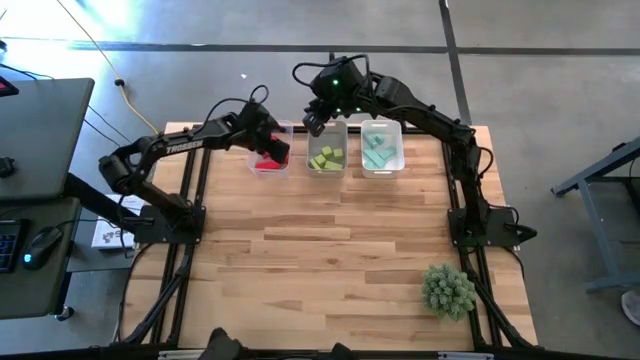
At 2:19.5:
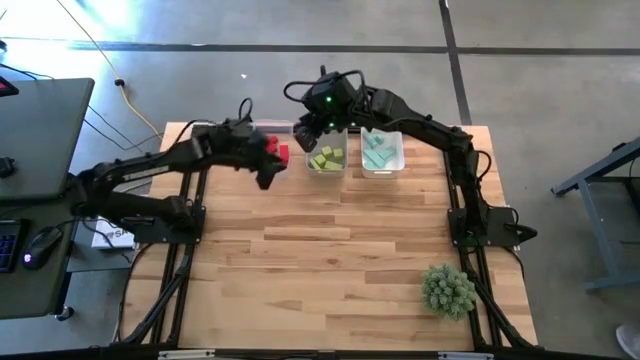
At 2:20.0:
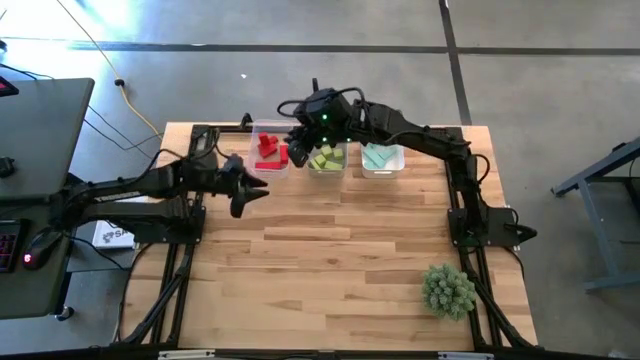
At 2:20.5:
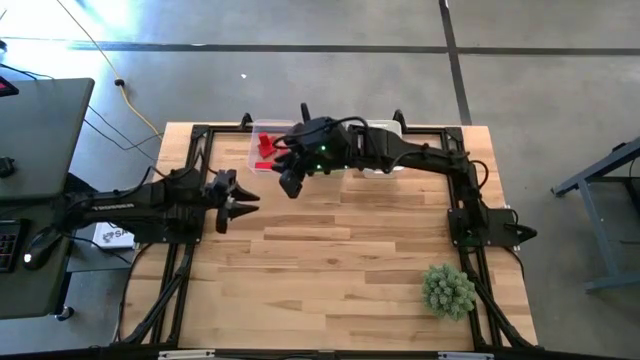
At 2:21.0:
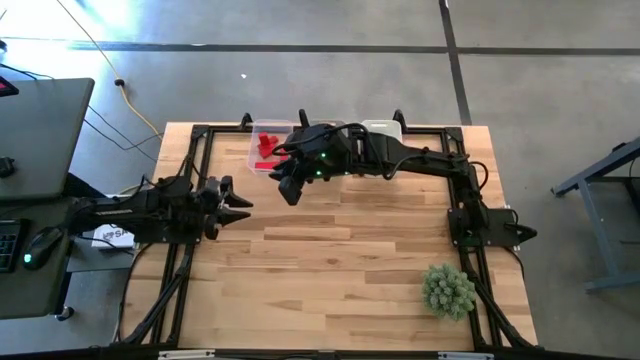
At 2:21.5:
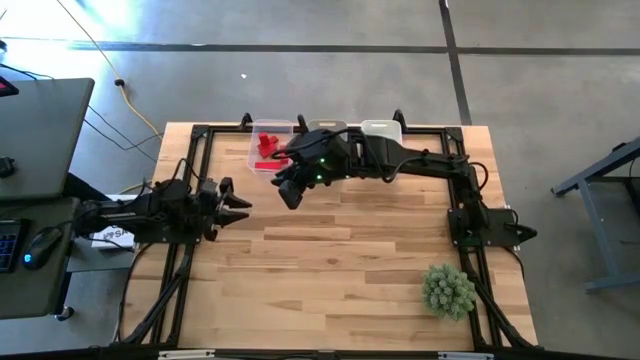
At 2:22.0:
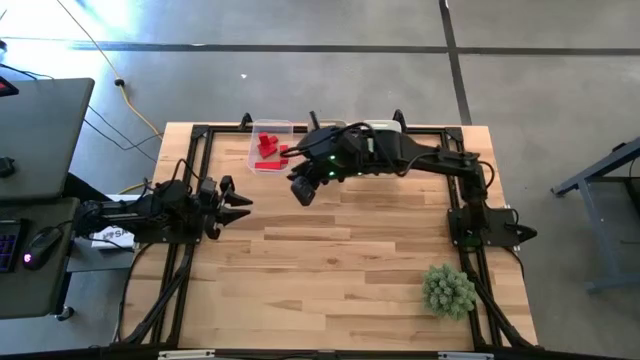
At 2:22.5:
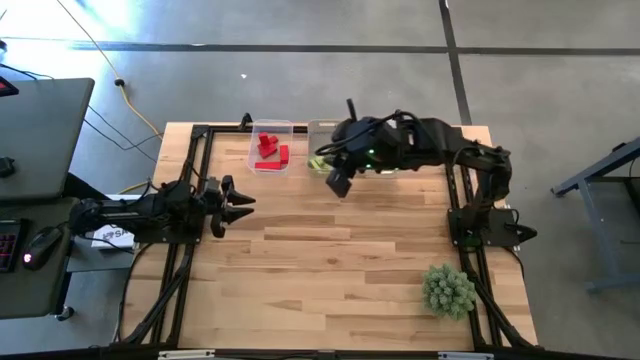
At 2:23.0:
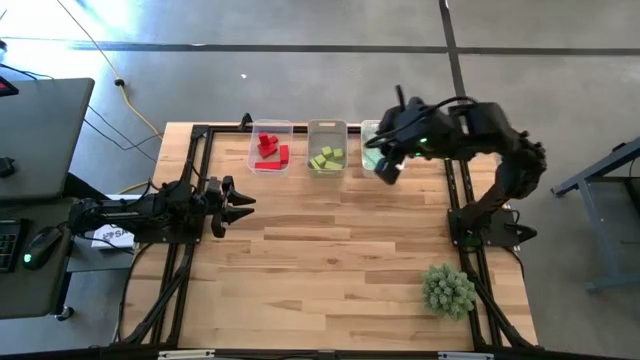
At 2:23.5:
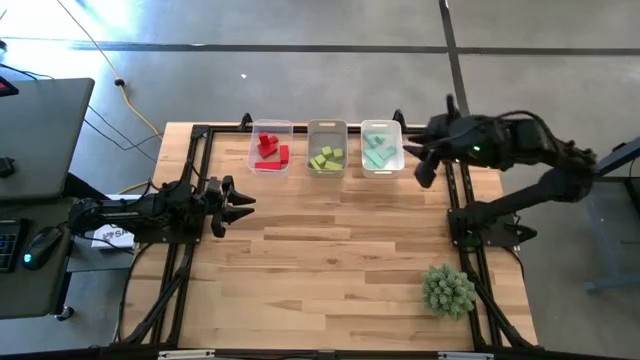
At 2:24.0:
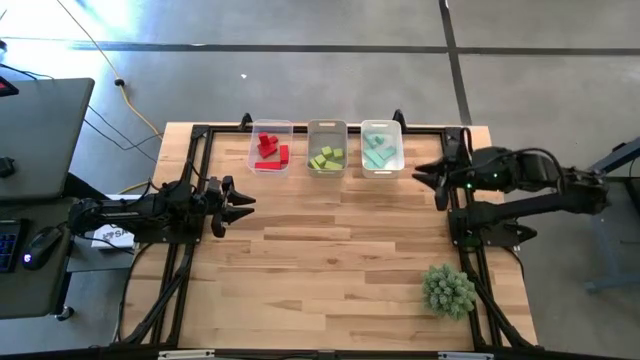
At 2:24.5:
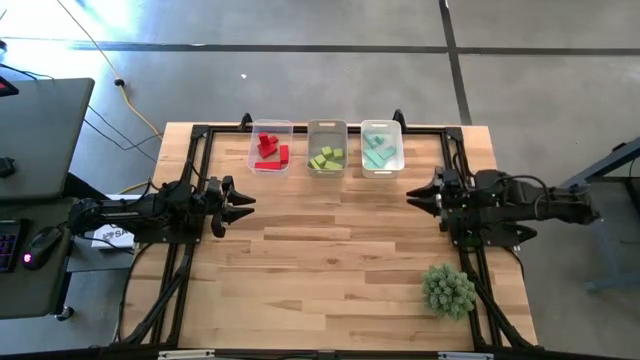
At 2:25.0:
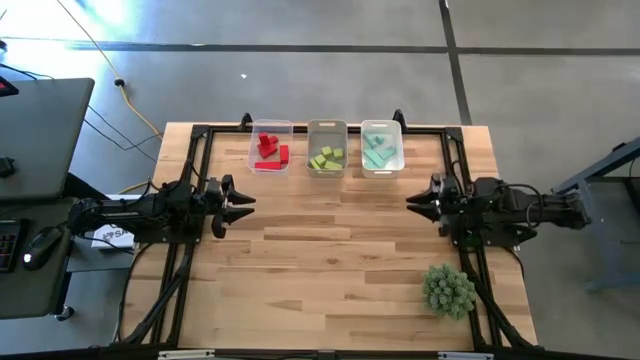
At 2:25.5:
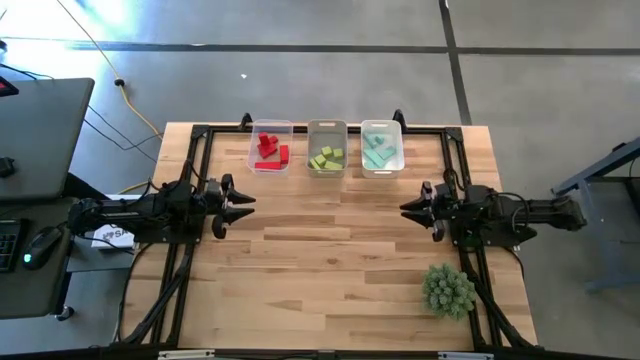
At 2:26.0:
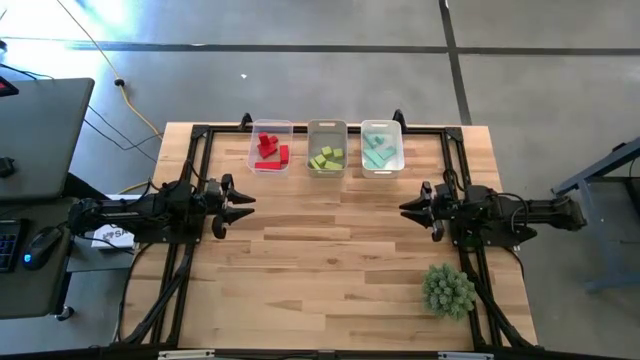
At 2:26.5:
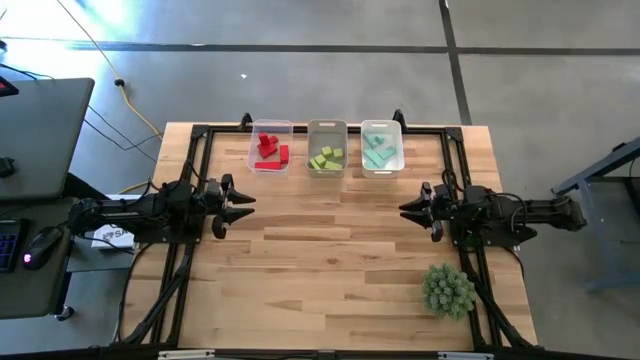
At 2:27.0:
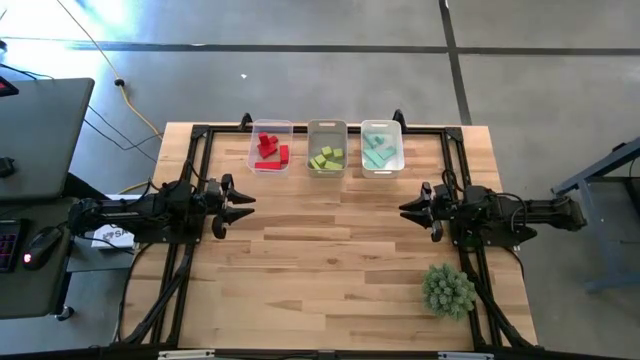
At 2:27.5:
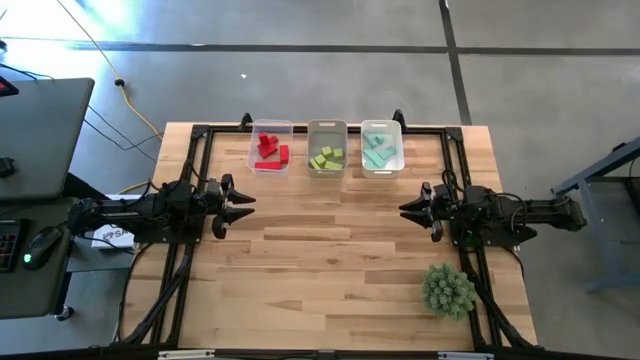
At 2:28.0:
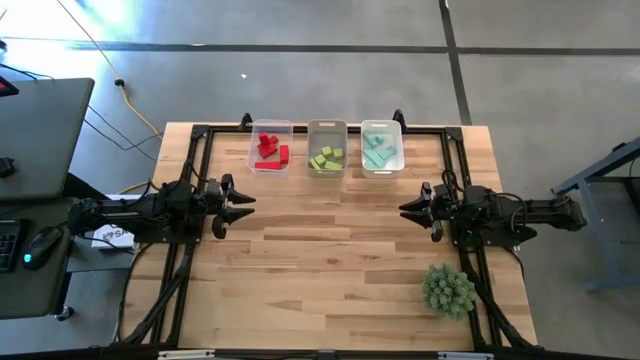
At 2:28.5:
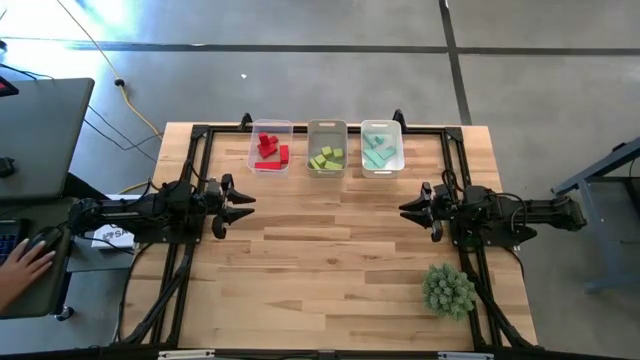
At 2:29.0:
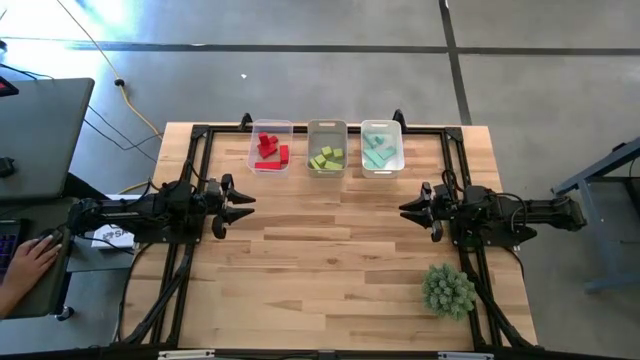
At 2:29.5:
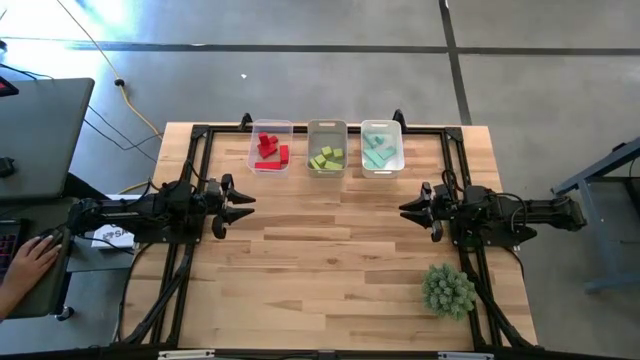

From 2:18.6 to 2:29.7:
Task: Sort & place blocks by color
Return to Home Position

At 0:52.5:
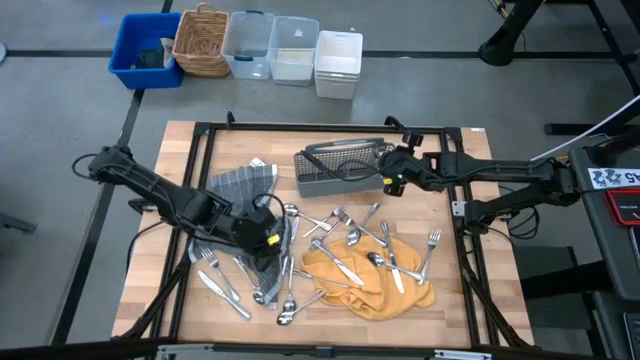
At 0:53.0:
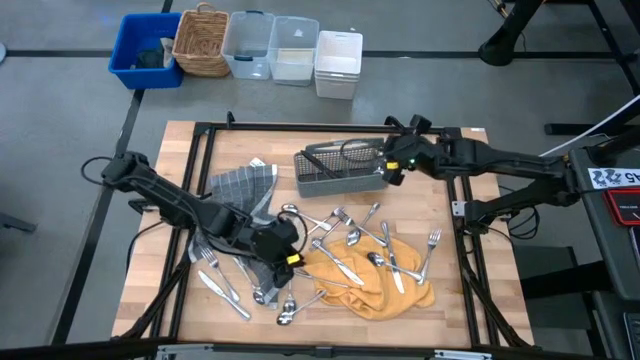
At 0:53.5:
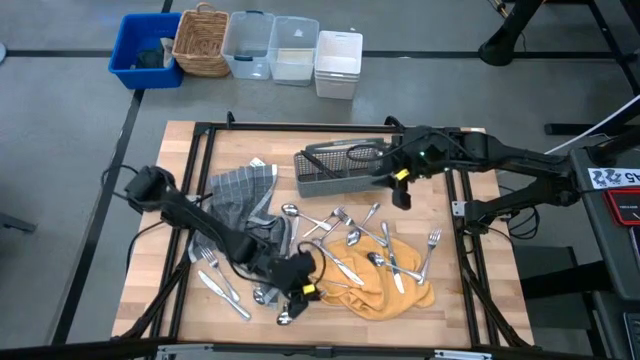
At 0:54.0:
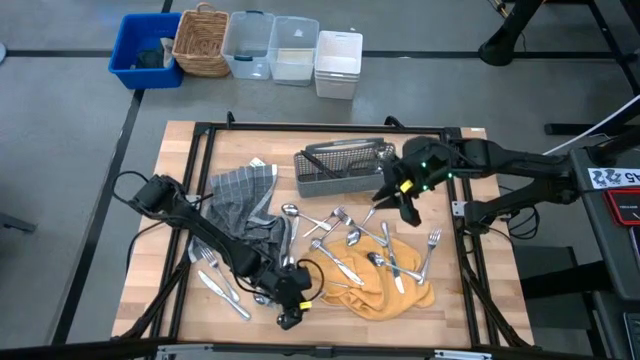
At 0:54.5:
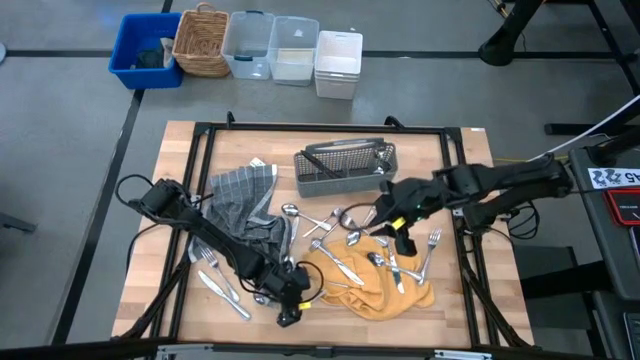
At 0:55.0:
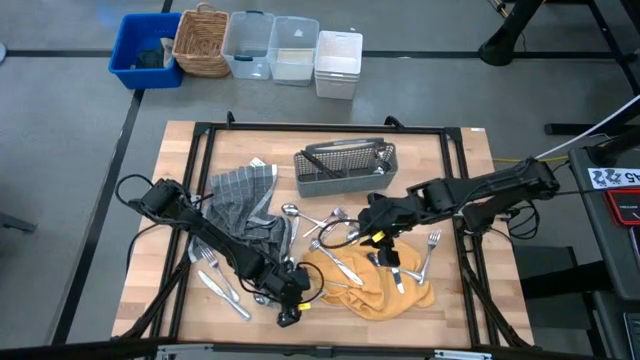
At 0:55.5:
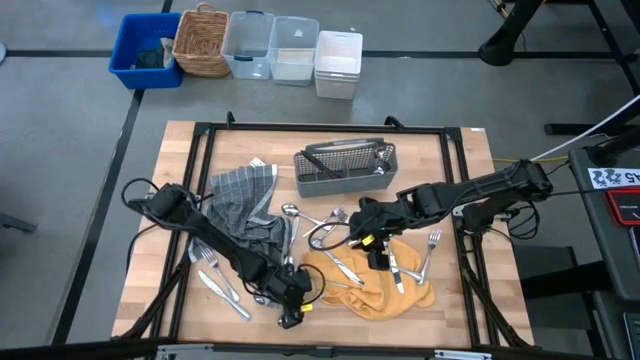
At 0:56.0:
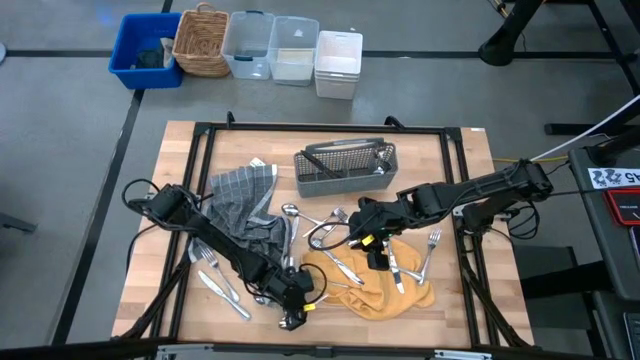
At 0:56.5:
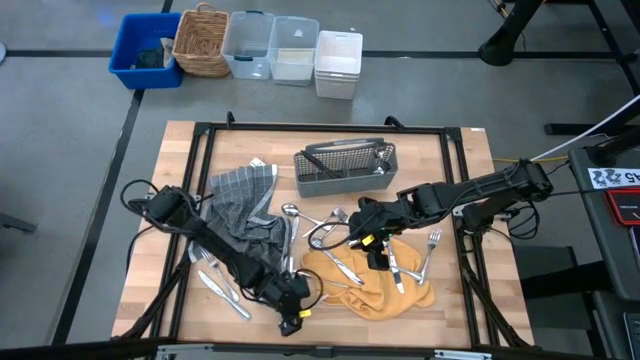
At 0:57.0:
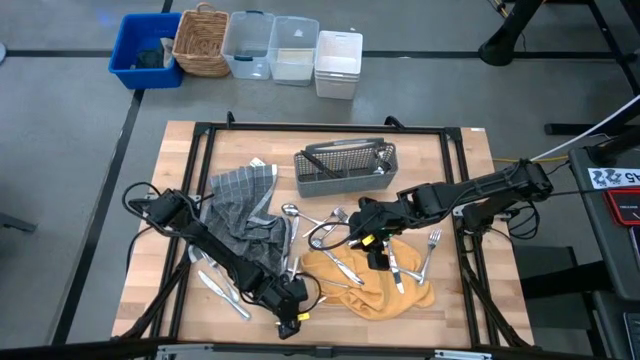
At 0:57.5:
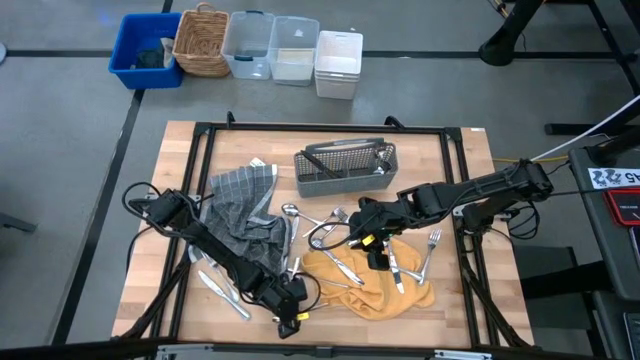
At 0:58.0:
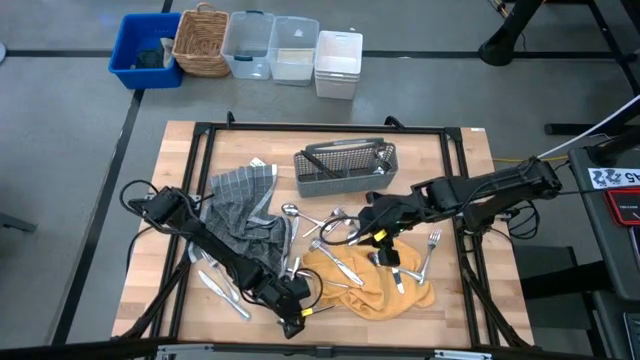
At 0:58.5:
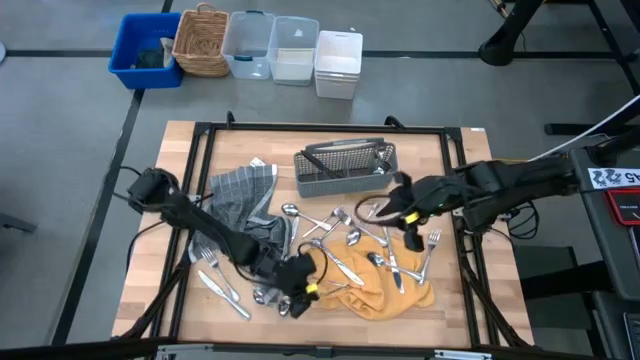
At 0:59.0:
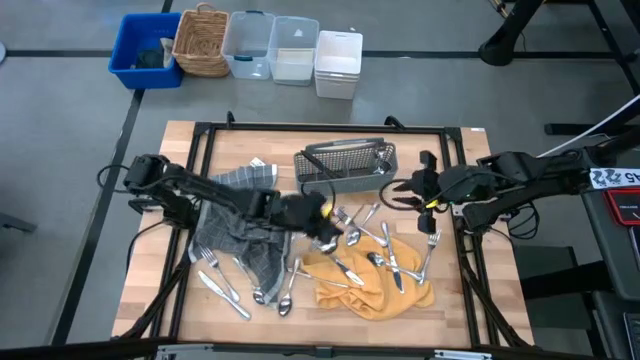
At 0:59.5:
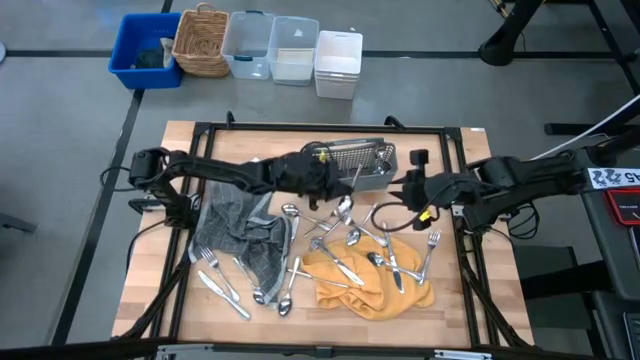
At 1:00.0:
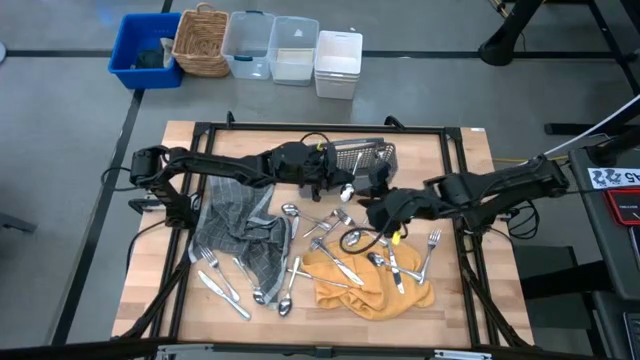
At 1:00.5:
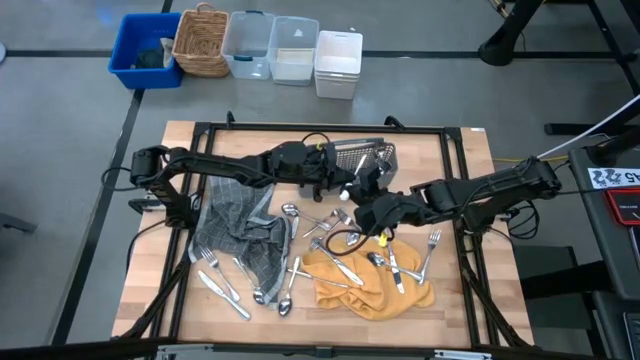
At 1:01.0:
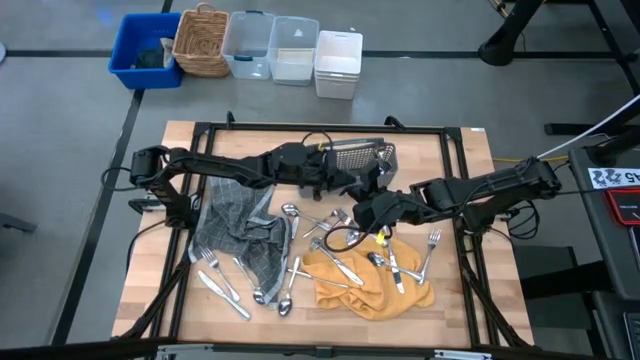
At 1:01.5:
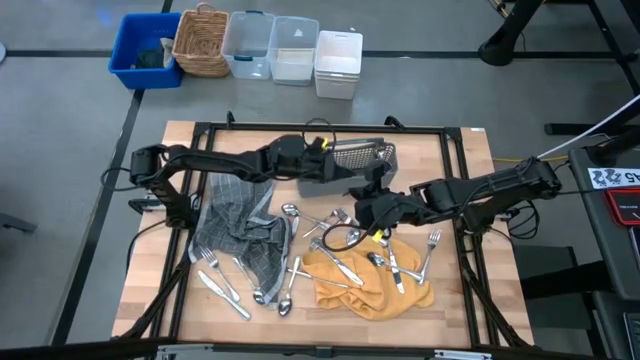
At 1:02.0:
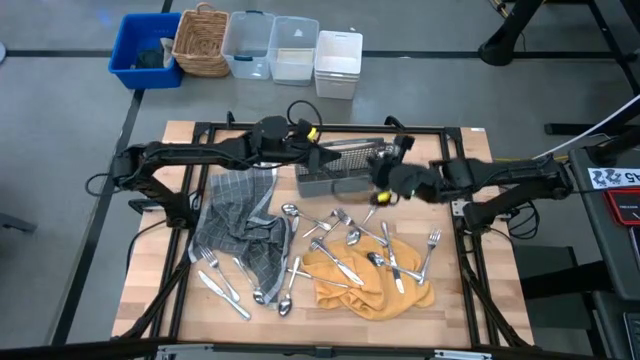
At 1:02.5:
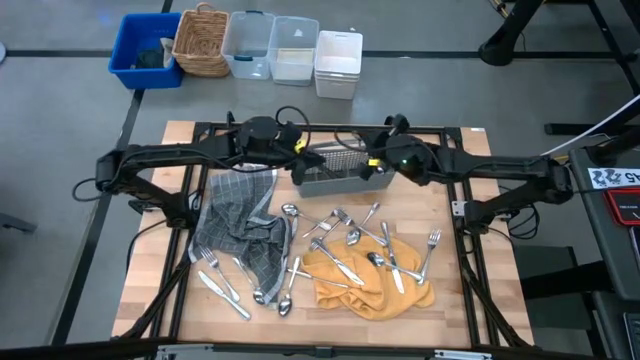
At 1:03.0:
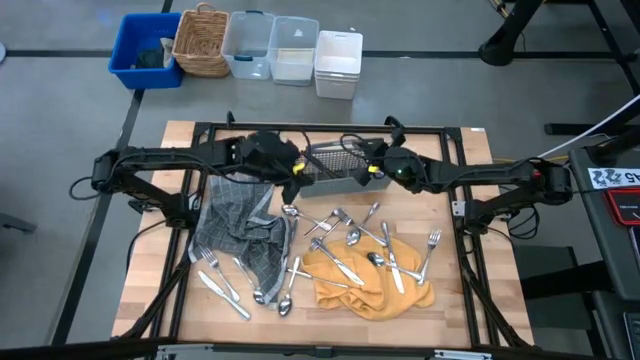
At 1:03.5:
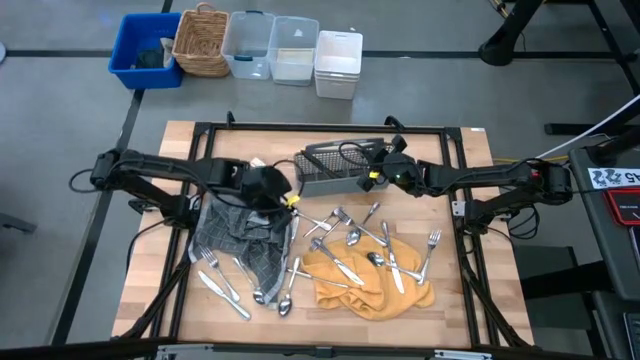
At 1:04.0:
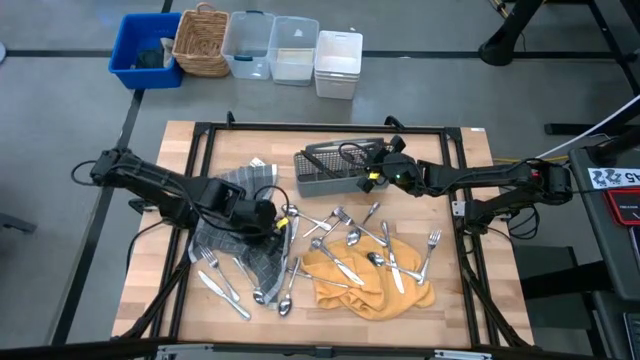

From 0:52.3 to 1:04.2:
Task: Sort silverware
Put the silver spoon into the gray utensil holder
